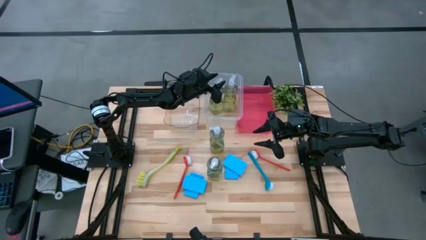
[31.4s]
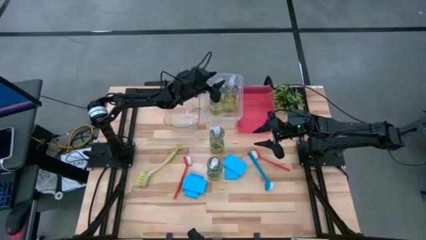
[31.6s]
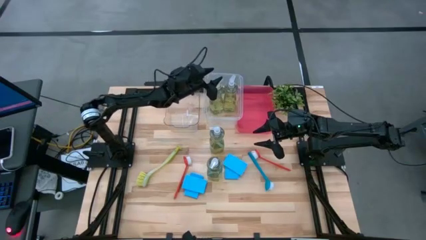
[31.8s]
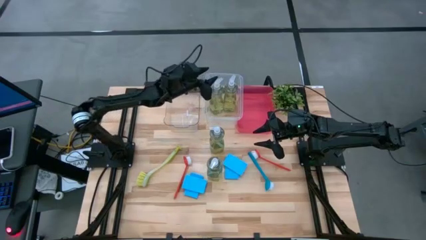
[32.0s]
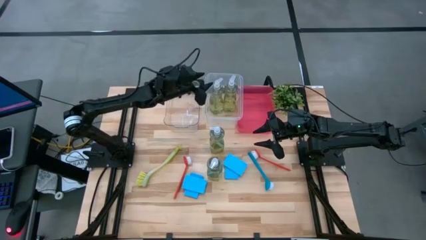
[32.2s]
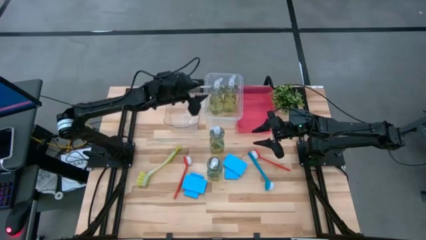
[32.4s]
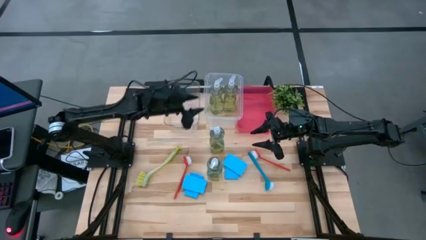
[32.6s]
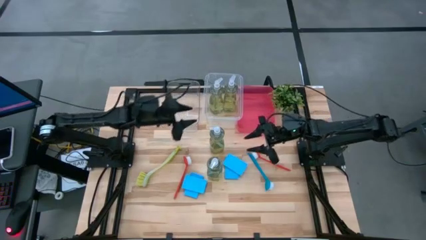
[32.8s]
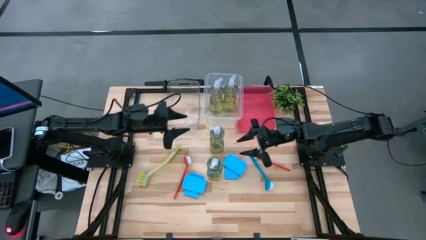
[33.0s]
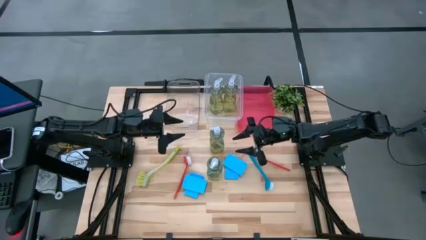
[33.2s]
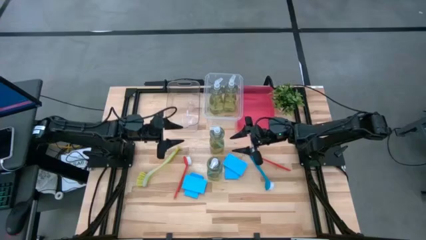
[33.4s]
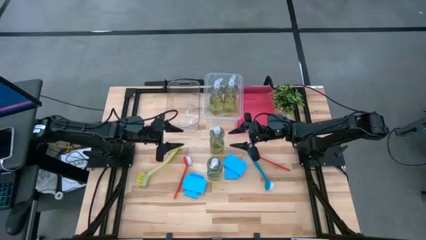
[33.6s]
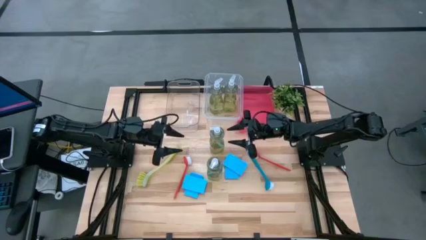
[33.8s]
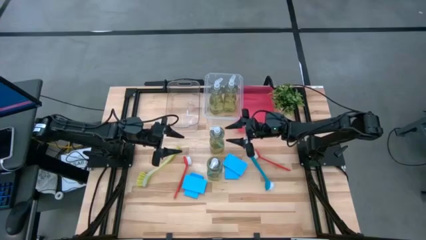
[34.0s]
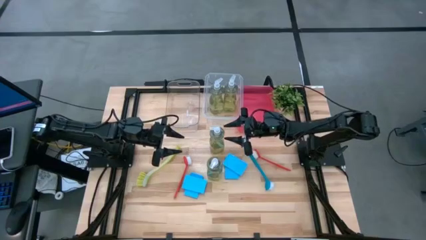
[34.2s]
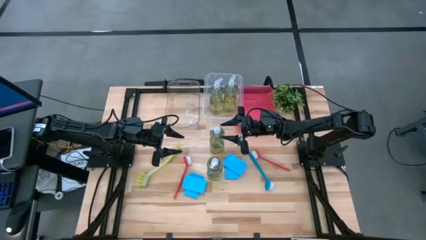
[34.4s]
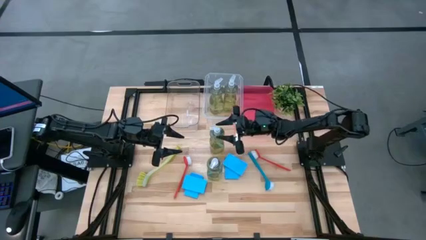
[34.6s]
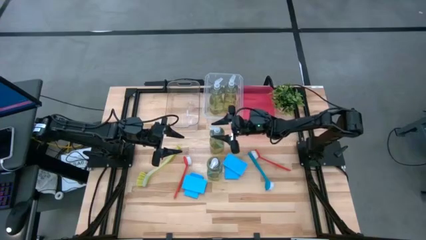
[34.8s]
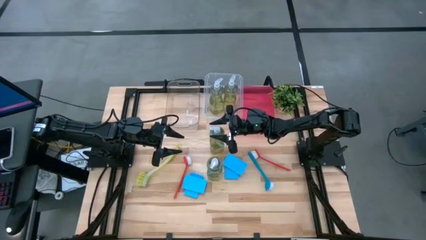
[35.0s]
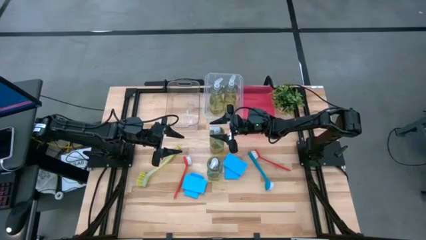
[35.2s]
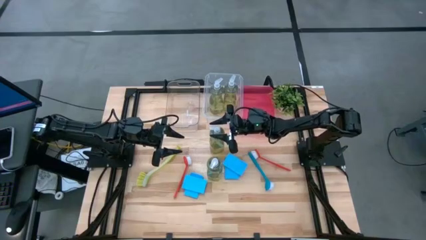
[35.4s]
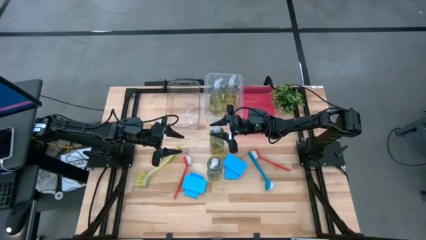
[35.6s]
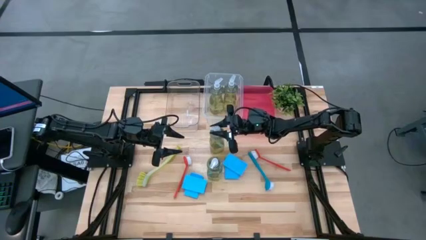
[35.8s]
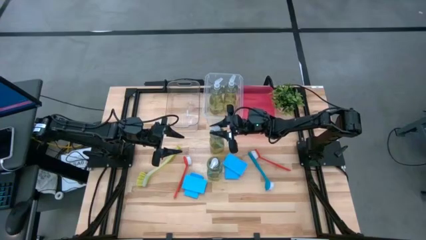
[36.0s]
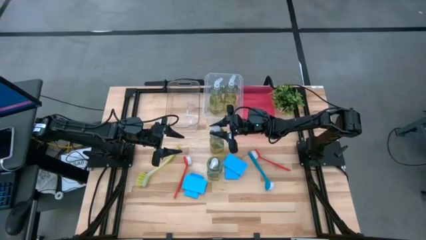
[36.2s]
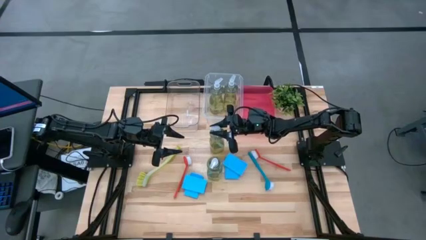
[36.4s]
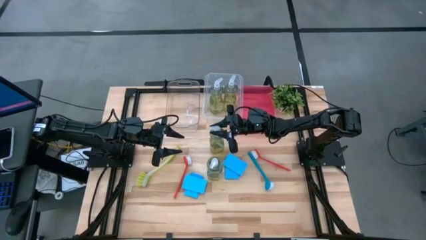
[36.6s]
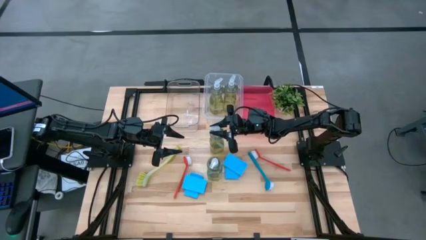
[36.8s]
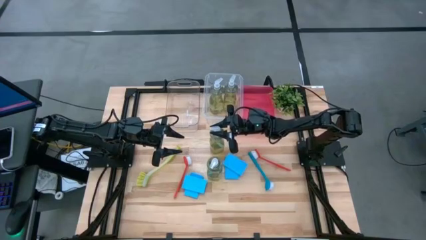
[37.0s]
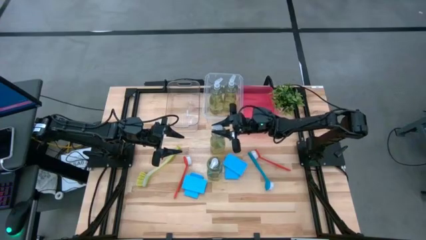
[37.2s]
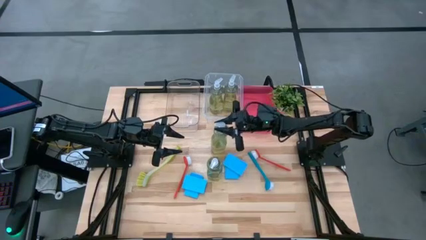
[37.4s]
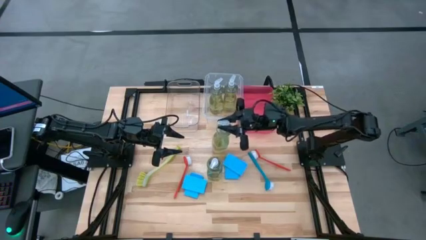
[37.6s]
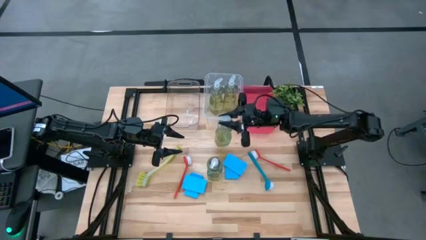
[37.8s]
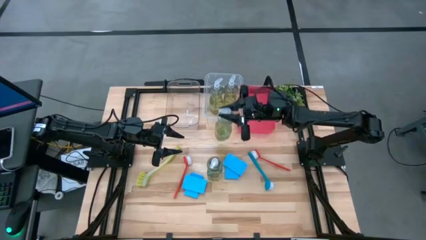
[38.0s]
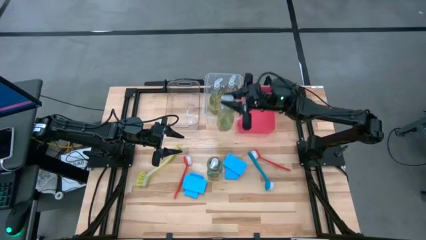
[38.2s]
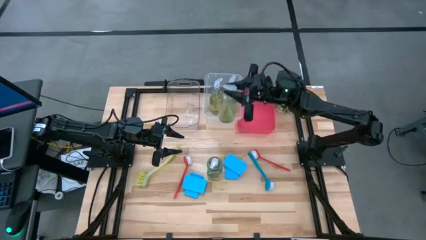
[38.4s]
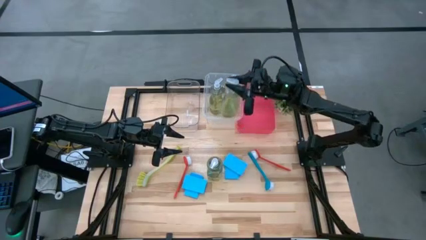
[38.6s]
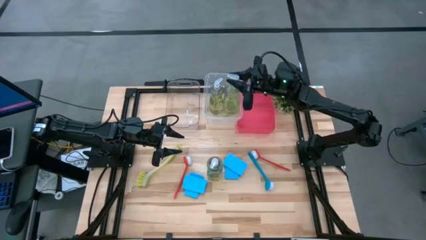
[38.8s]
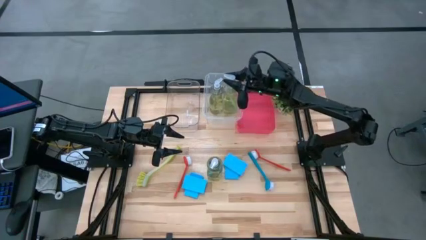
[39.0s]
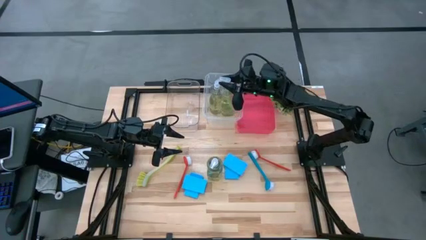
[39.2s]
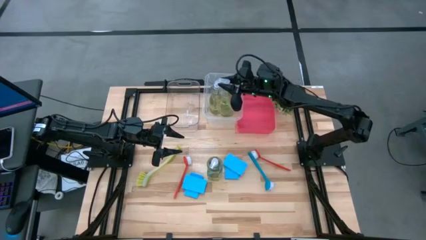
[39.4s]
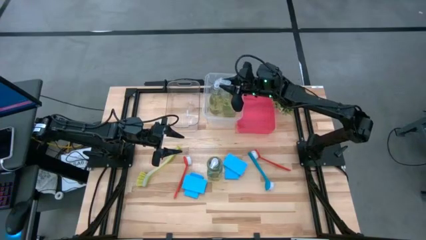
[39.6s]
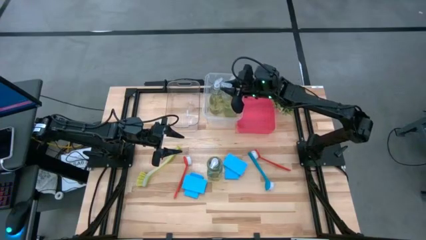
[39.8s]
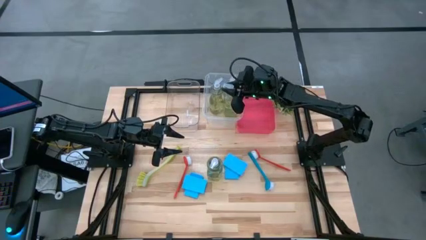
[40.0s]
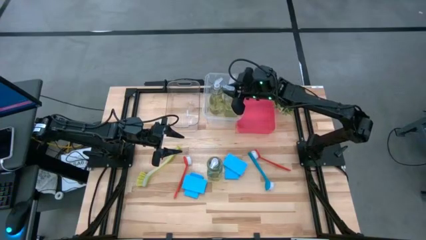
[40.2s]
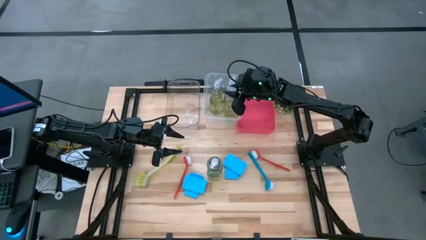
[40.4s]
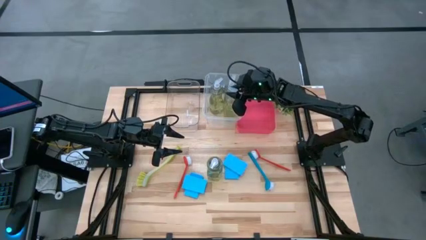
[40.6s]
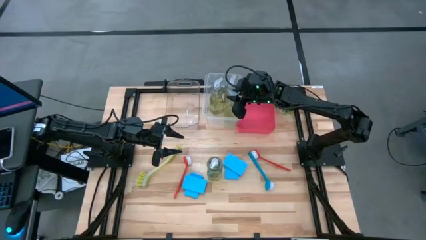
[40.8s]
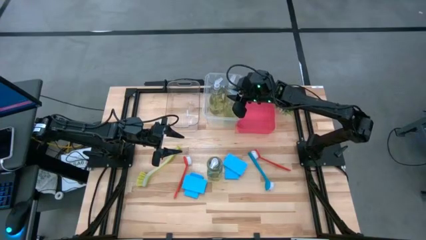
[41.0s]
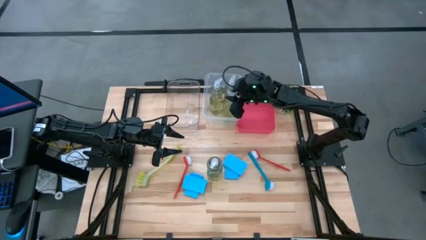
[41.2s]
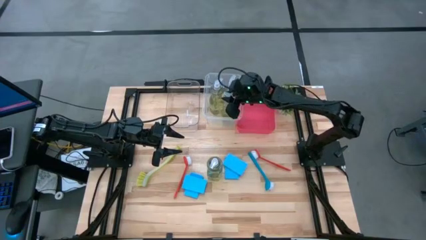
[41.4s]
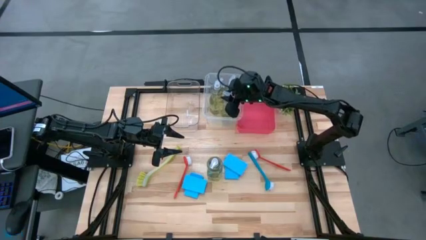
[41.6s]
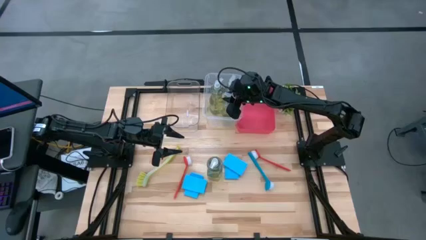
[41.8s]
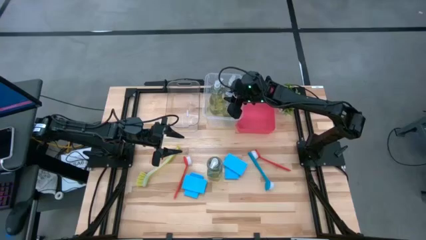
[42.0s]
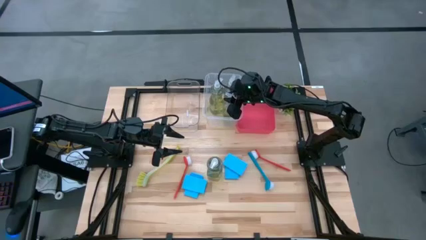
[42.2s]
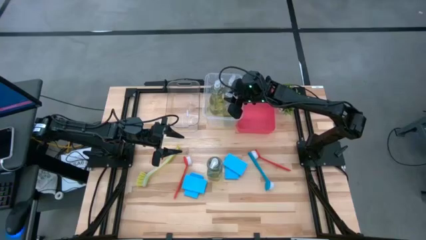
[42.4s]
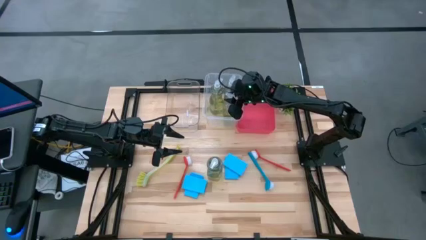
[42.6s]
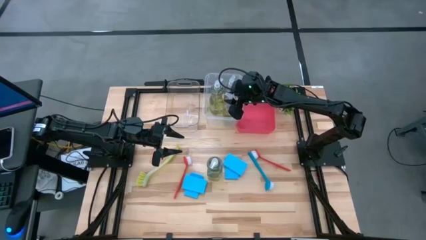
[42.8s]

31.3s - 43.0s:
Task: Pick & Place Kitchen Sink Supplies
Put the green dish soap into the white bin

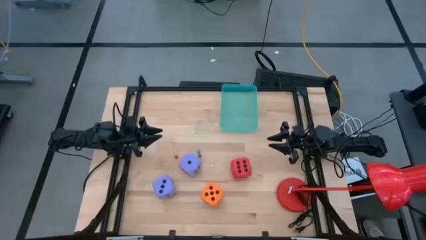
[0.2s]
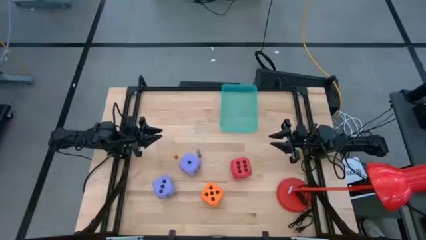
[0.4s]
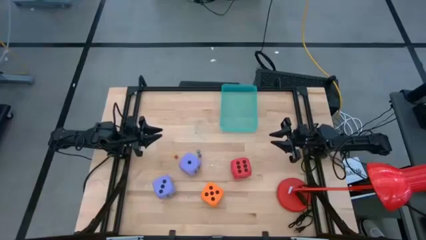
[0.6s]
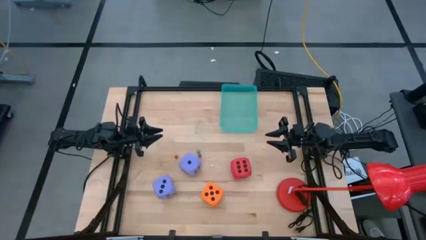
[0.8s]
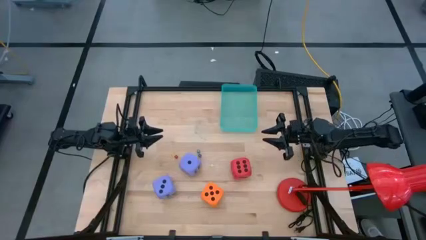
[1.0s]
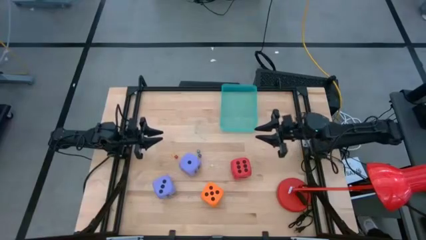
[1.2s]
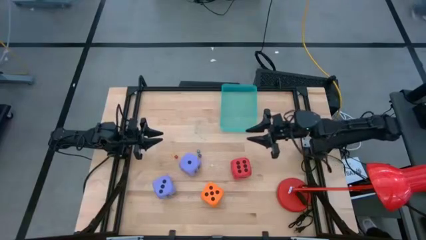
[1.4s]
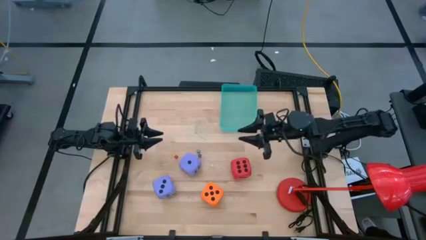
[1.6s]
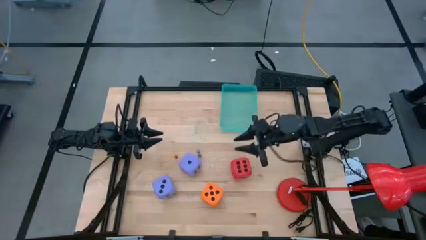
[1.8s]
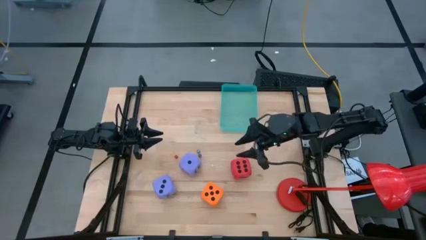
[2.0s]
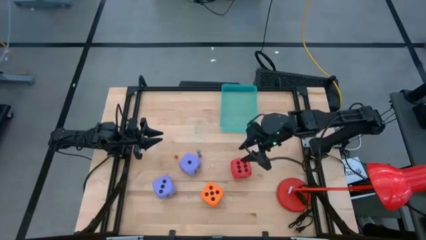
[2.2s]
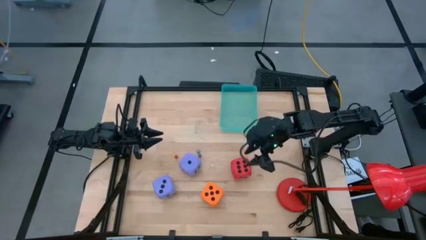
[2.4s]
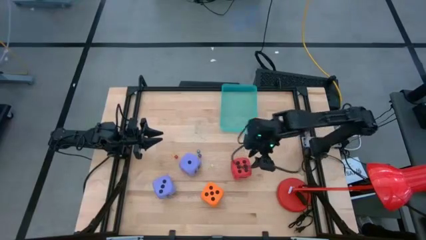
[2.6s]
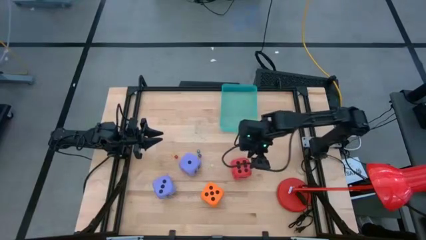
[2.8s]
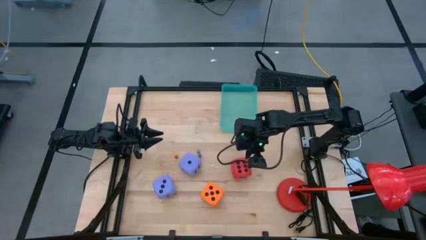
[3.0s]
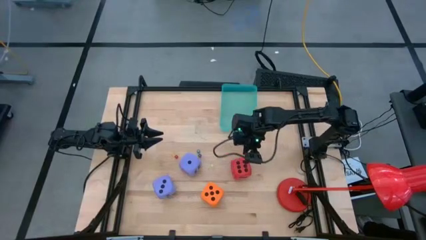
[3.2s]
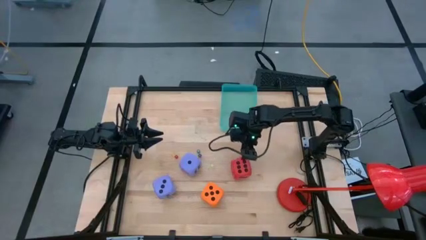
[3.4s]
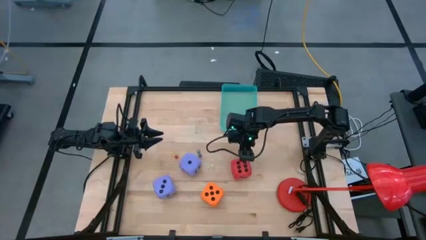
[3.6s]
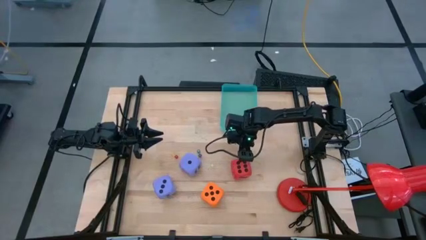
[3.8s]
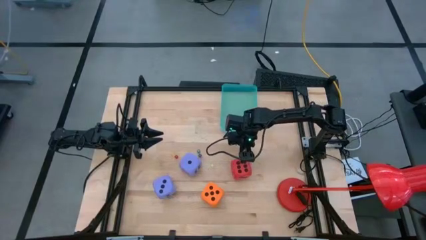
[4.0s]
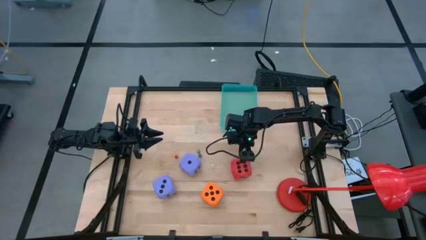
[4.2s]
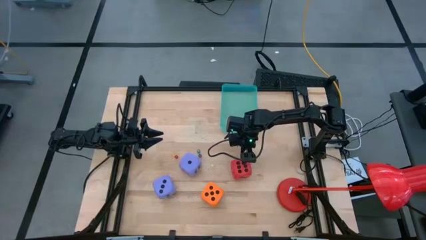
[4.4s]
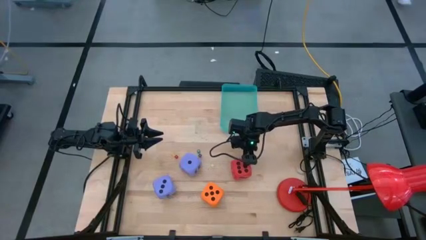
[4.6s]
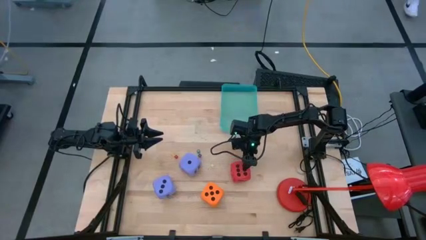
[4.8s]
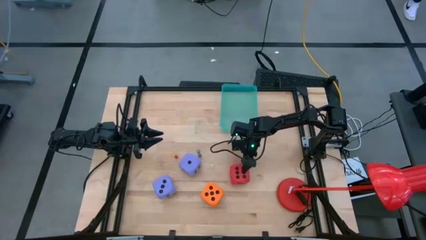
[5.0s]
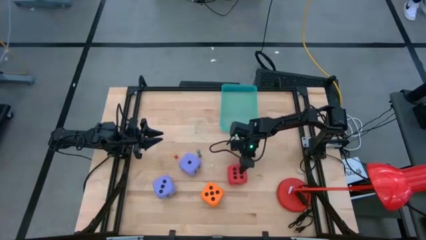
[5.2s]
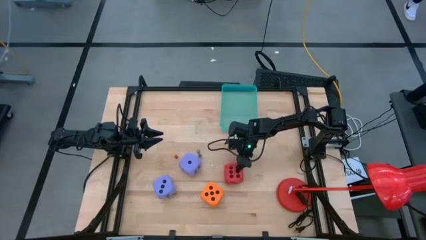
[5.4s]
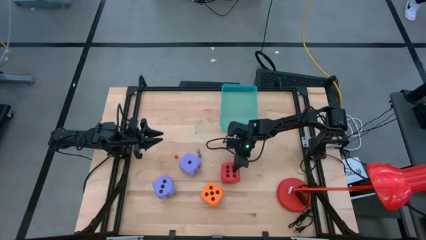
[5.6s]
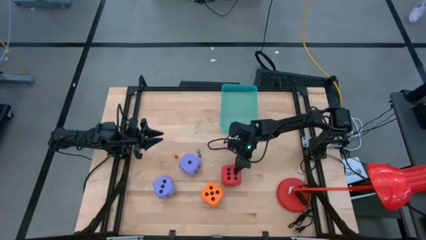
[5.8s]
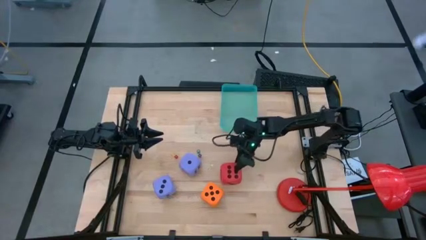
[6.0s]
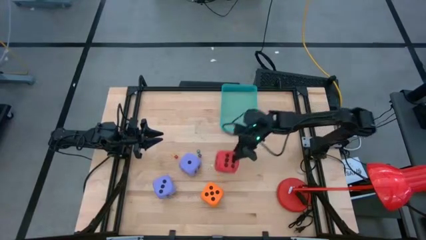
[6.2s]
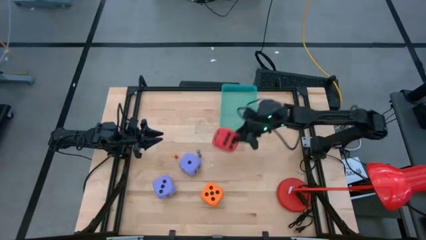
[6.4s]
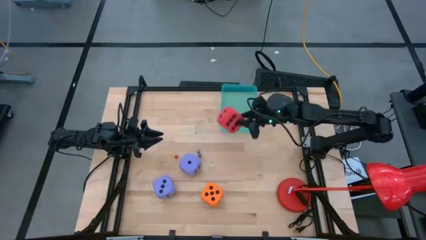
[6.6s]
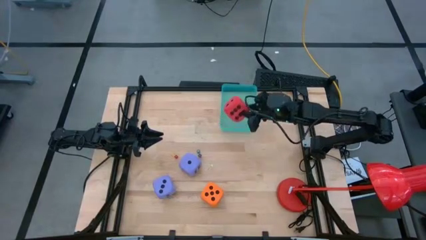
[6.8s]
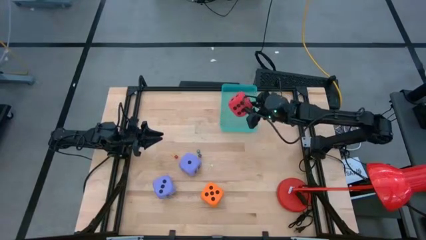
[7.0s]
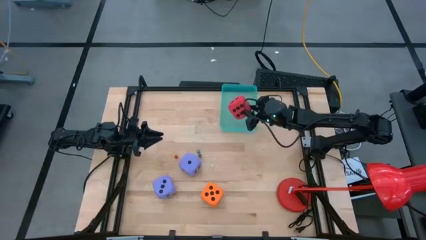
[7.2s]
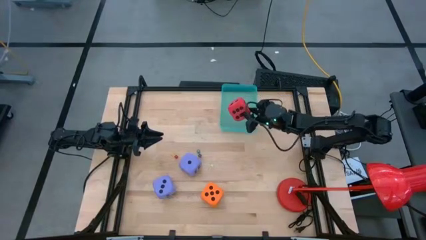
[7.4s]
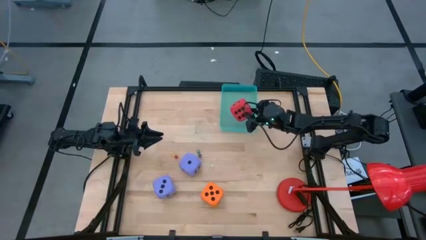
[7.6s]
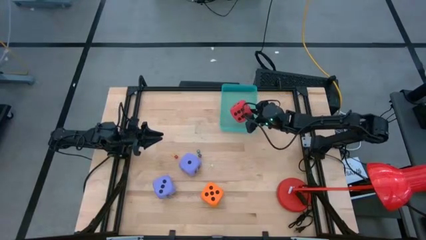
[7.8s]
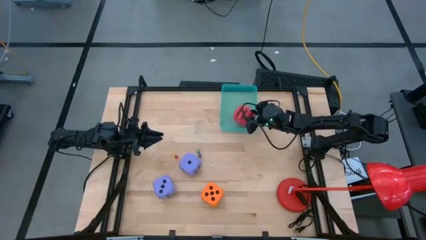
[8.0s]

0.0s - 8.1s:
Task: Pick & Place Dice
Put the large red die into the green bin
